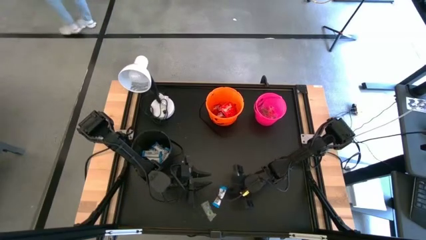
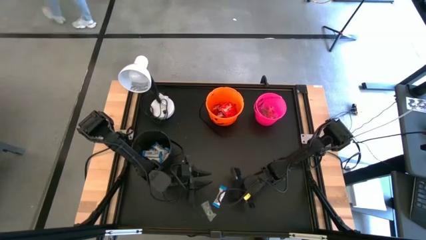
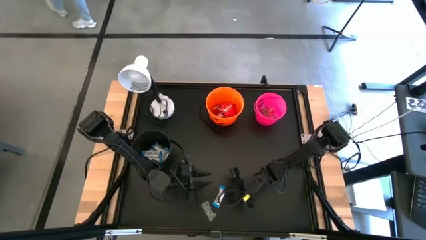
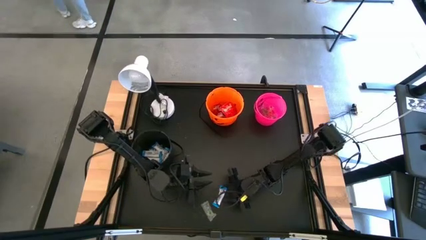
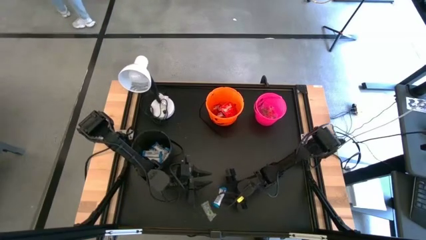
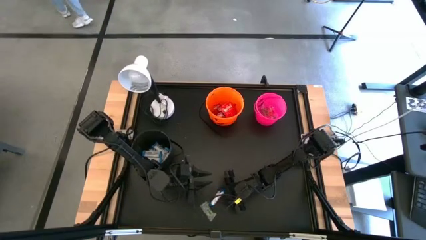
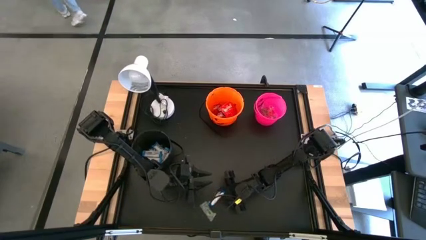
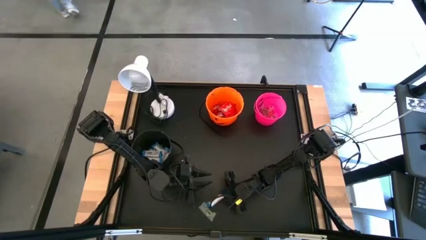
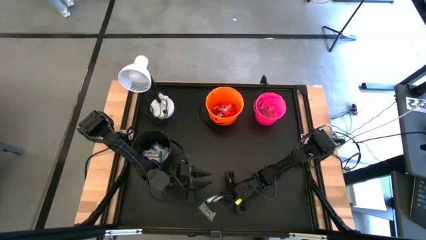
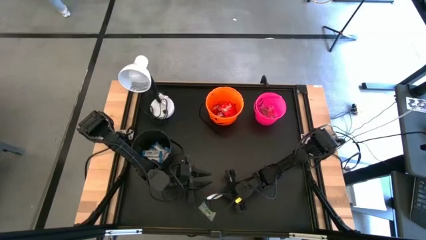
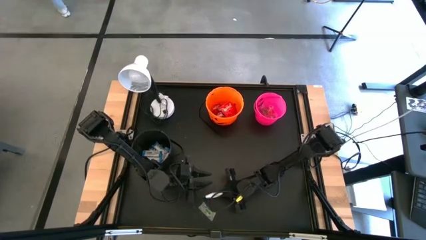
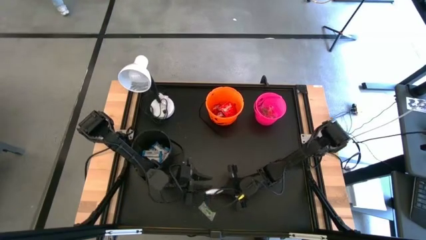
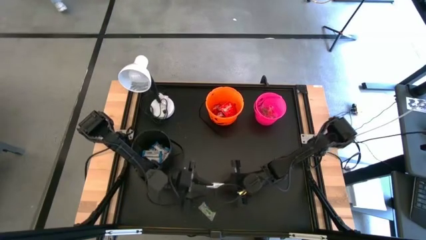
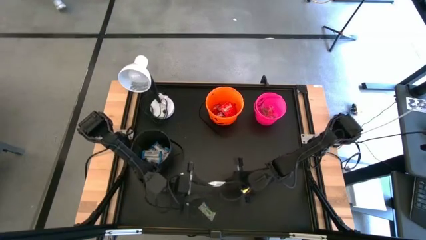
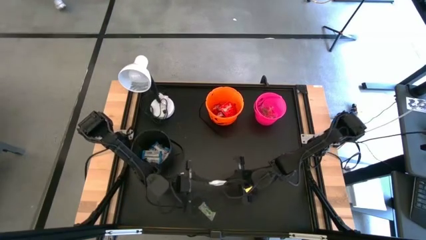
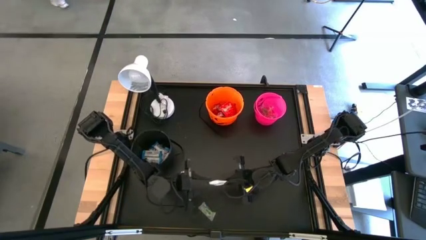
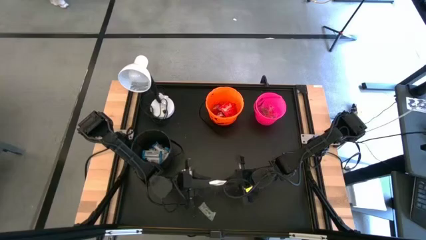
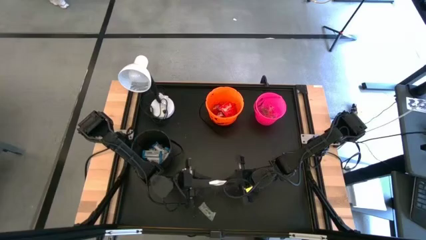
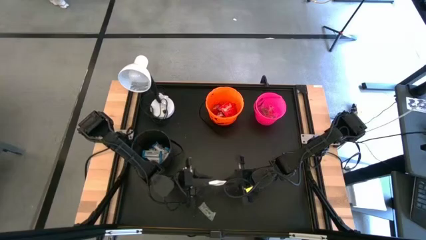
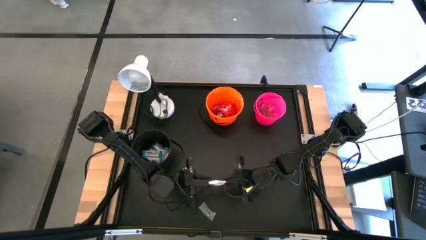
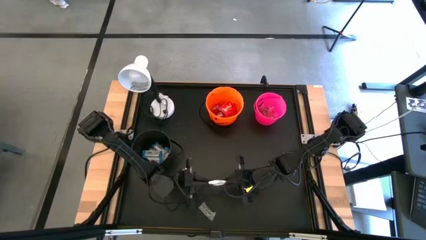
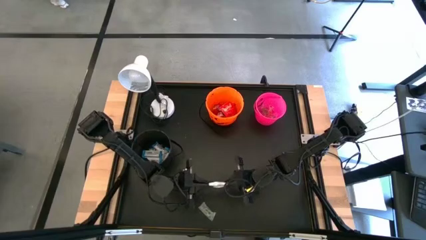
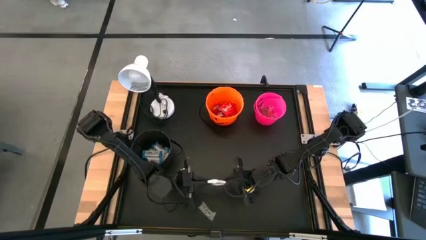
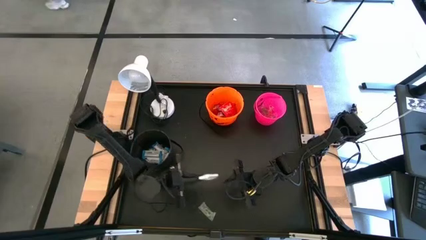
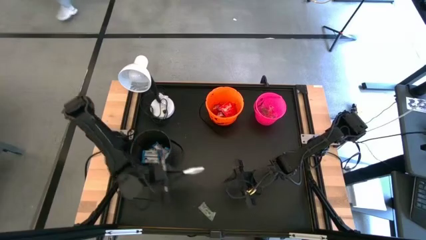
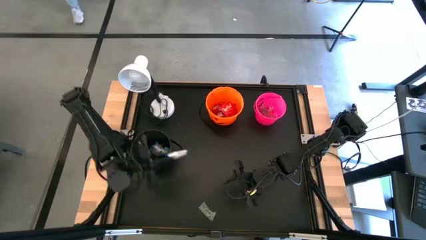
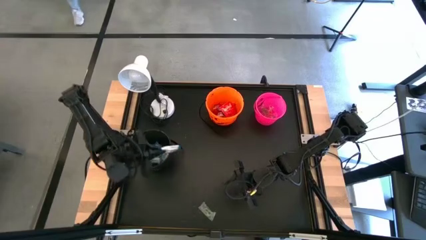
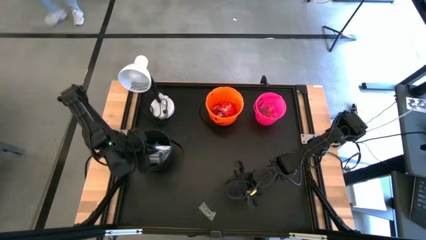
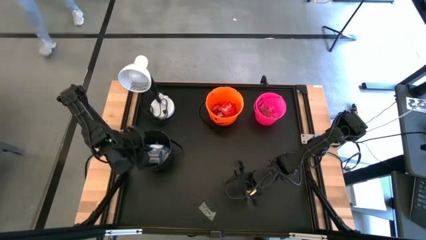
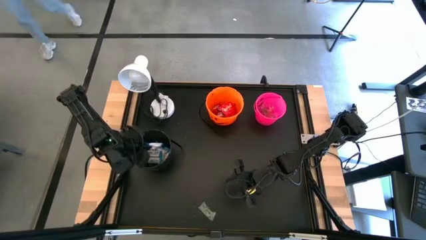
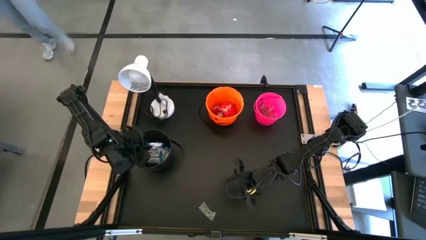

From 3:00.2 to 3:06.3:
Task: Sort candy
Put the white candy into the black bucket

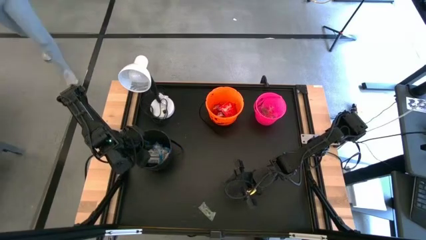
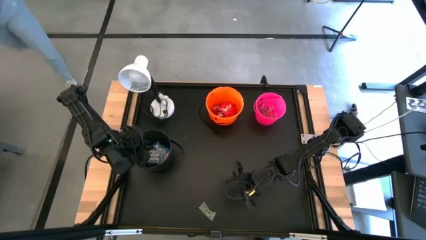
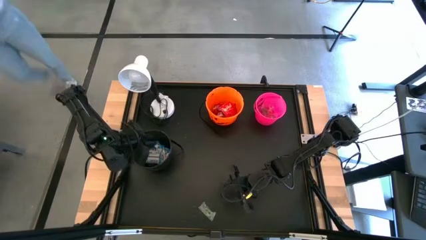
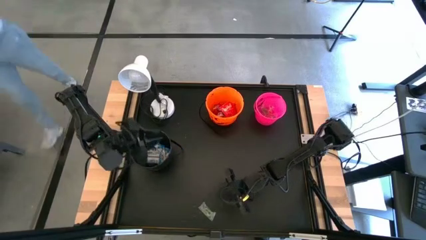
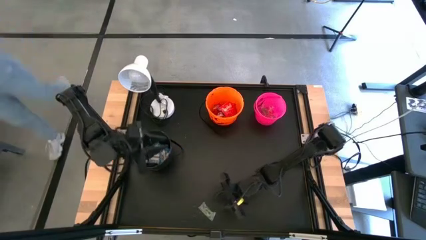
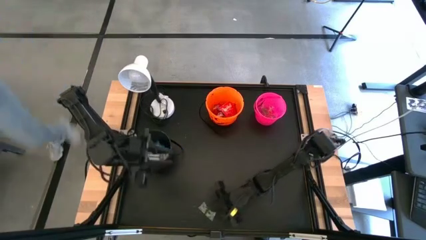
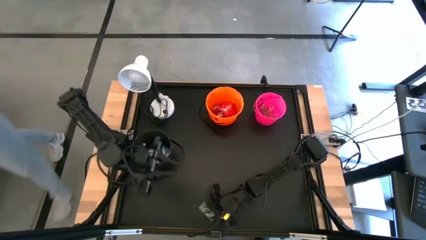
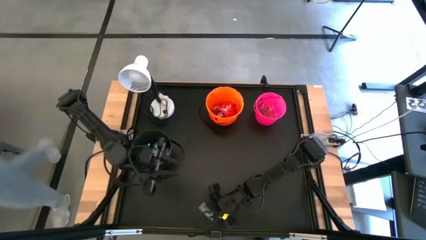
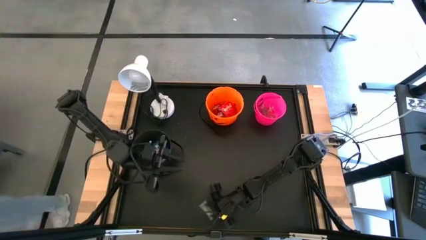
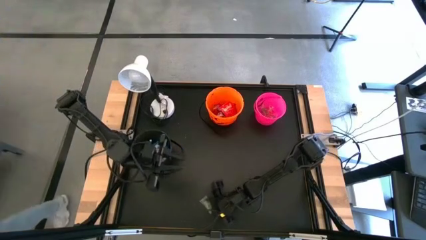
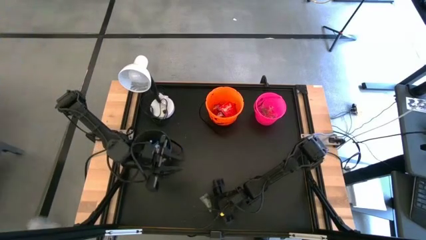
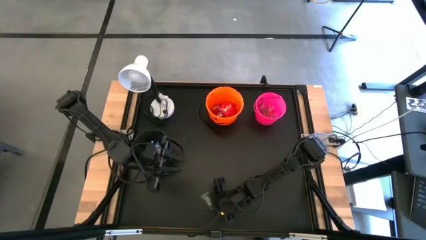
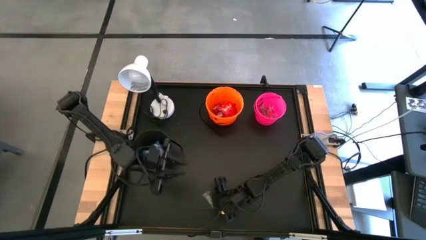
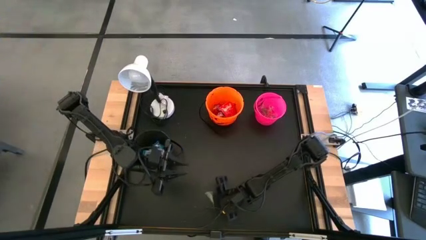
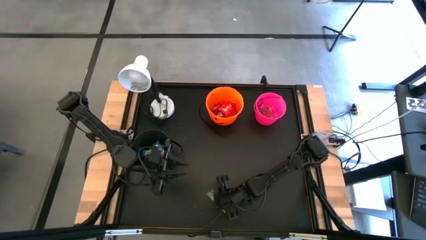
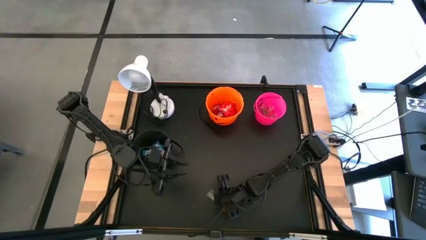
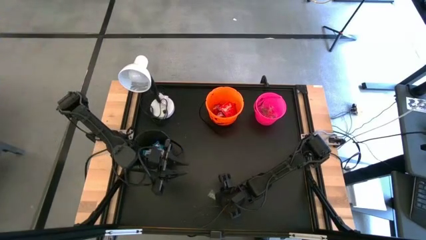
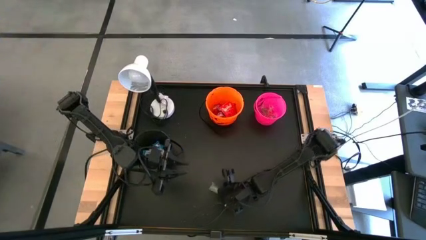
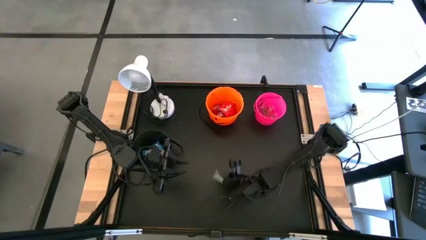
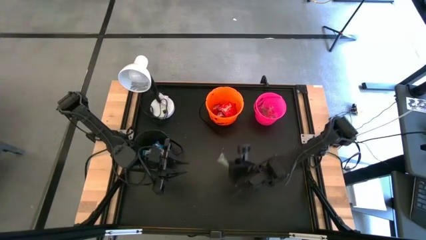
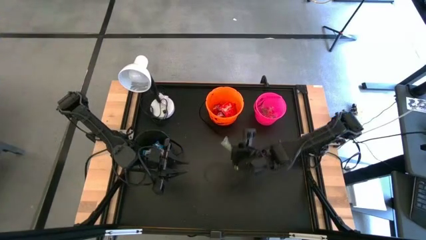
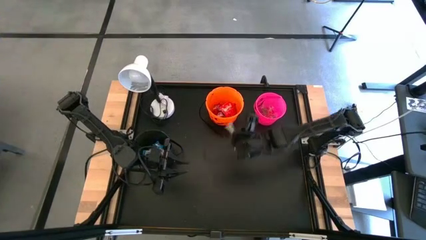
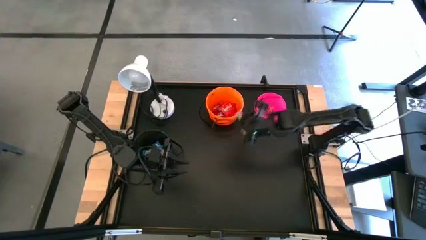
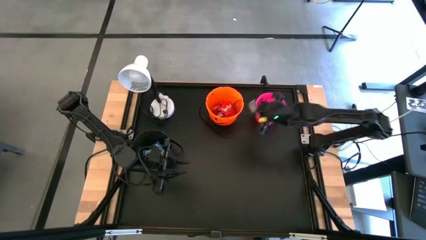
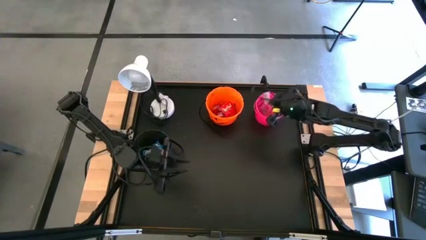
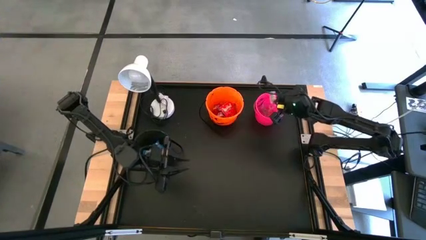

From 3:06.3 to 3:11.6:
Put the green candy into the pink bucket

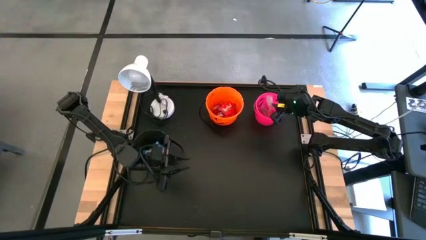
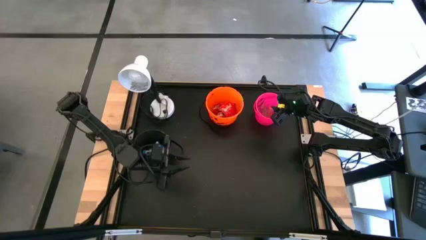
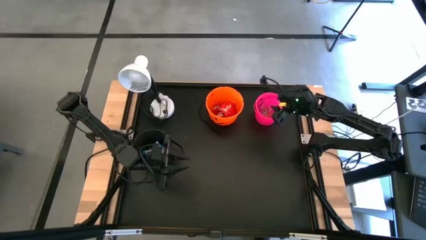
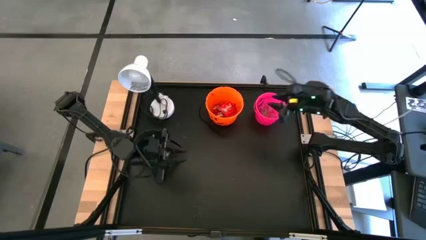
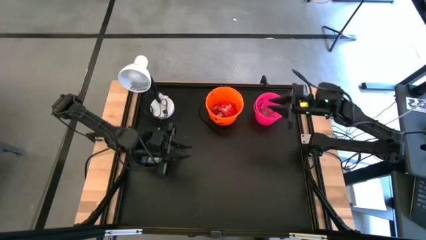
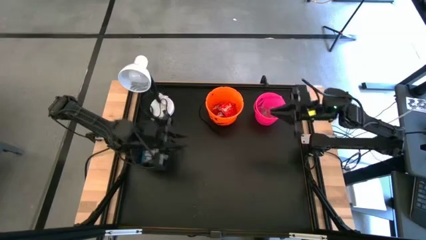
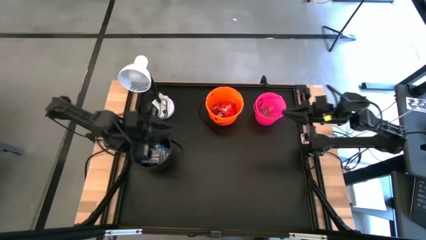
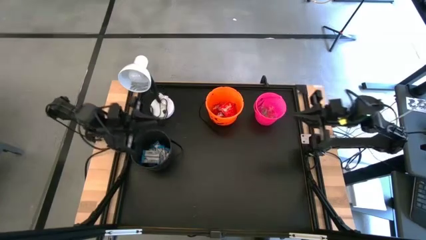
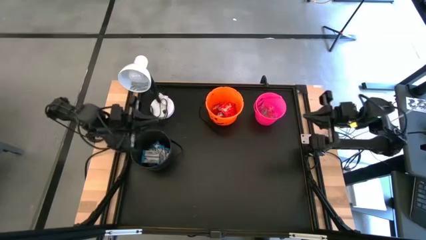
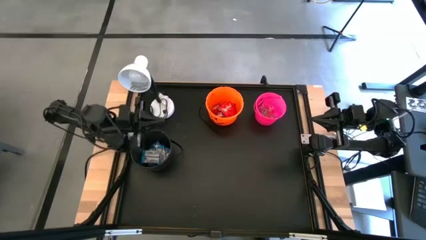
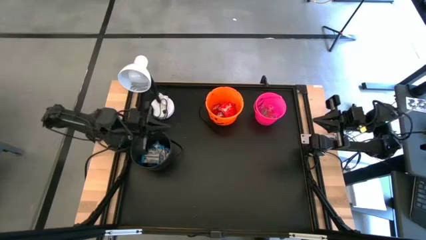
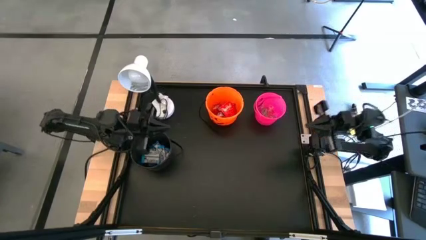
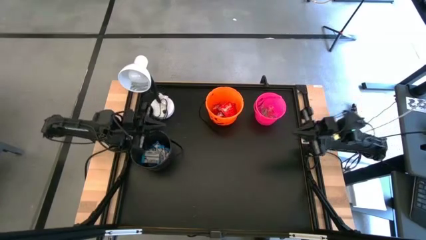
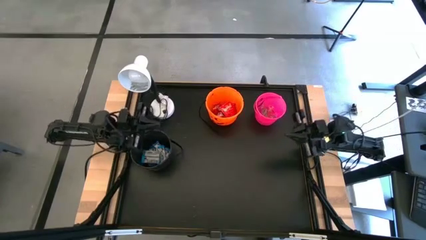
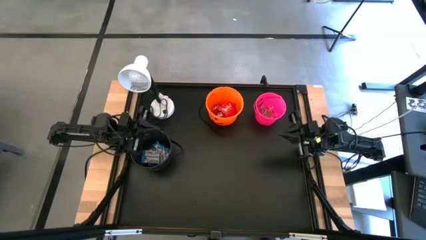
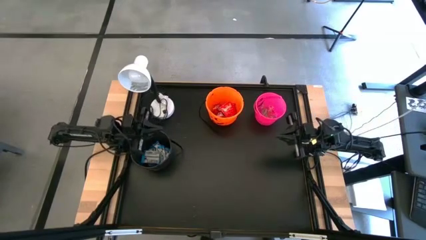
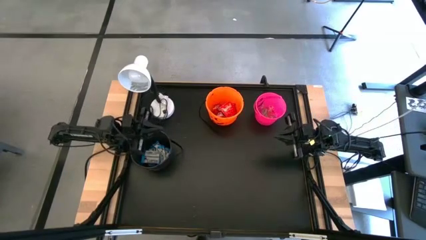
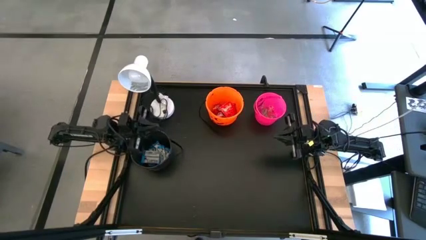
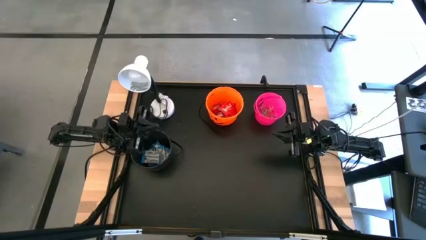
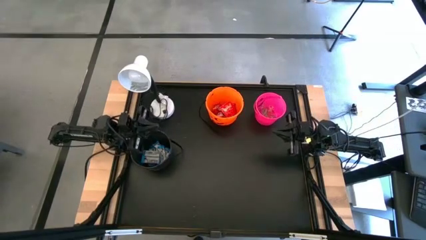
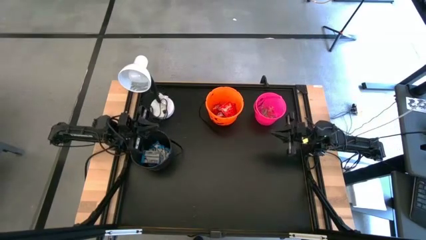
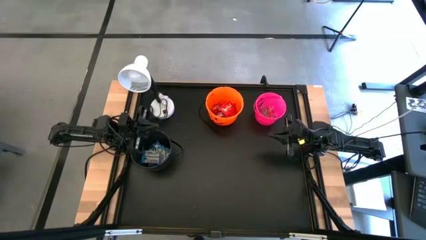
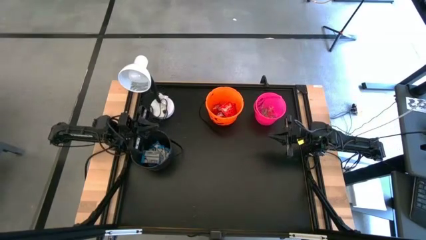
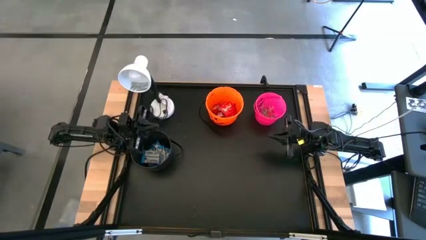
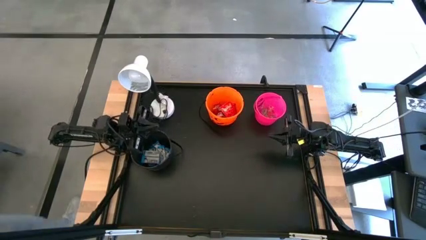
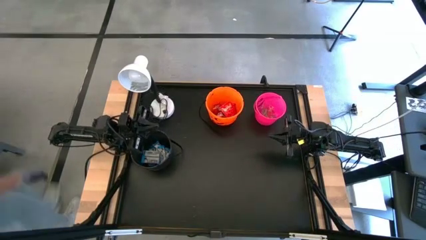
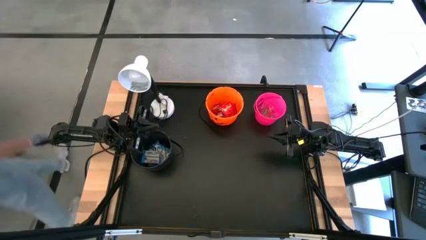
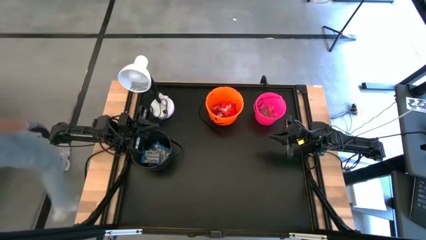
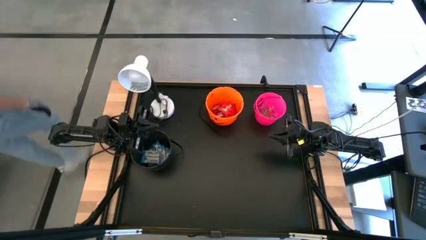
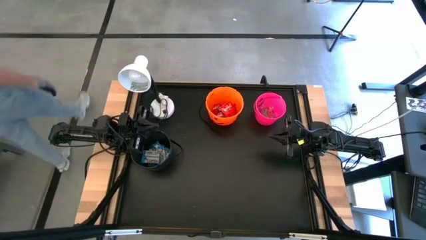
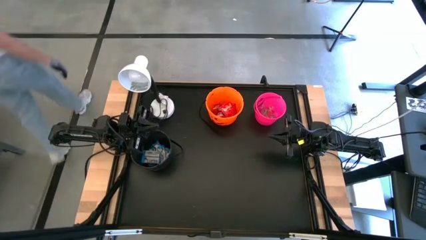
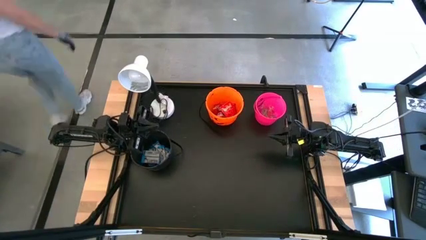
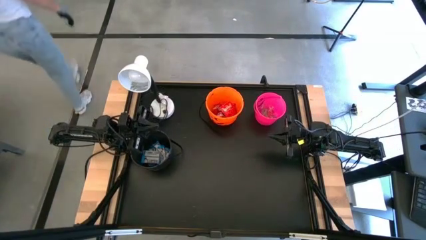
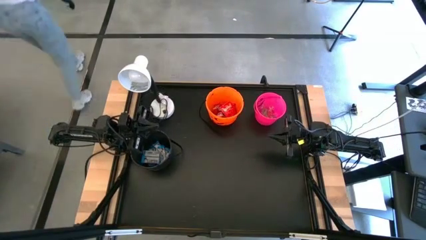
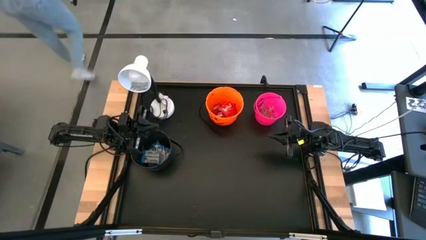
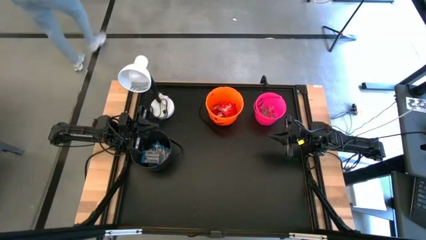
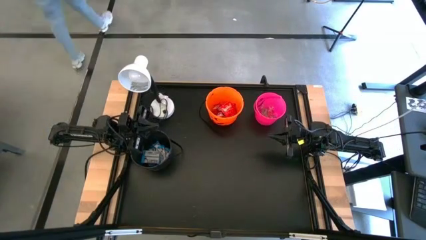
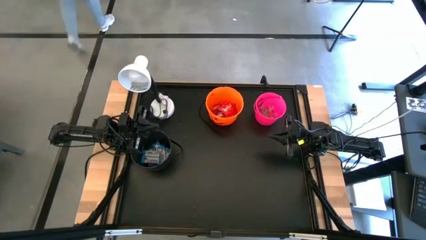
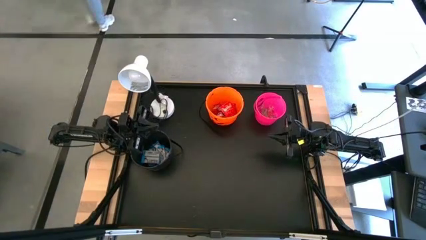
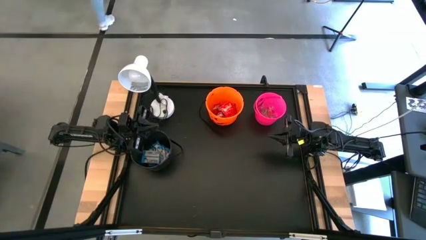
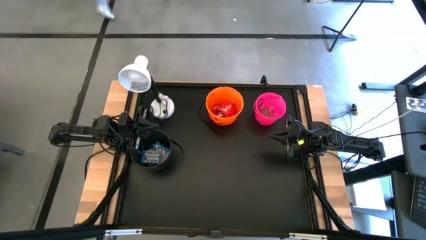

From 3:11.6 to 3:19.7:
Return To Home Position
